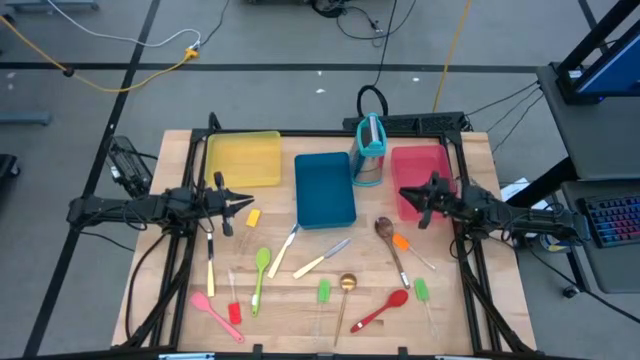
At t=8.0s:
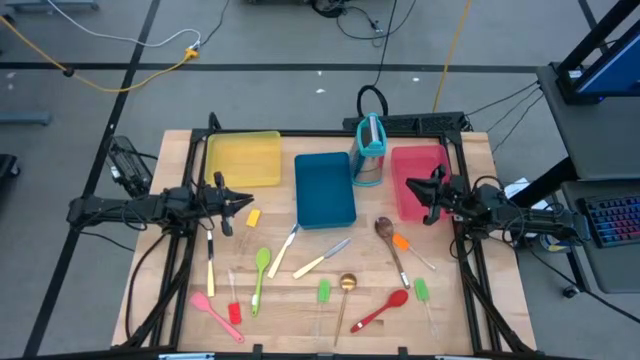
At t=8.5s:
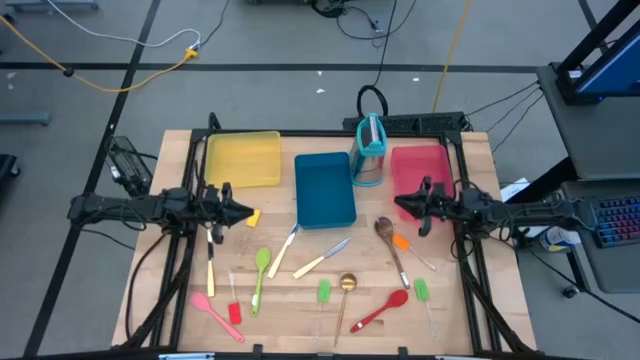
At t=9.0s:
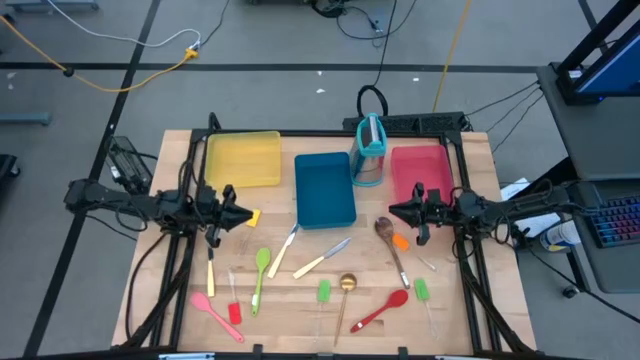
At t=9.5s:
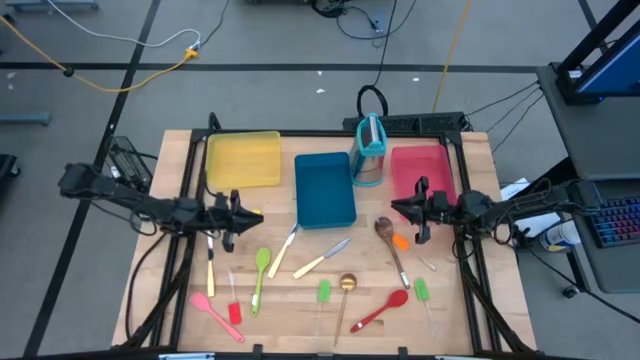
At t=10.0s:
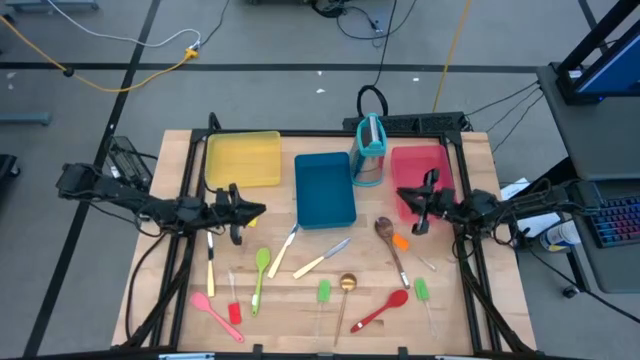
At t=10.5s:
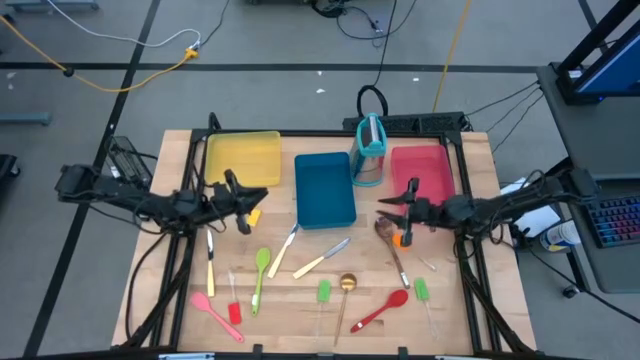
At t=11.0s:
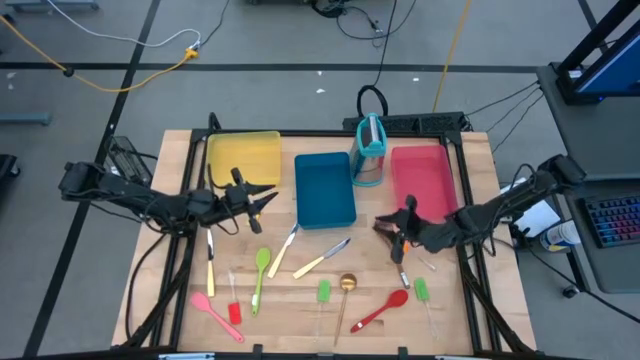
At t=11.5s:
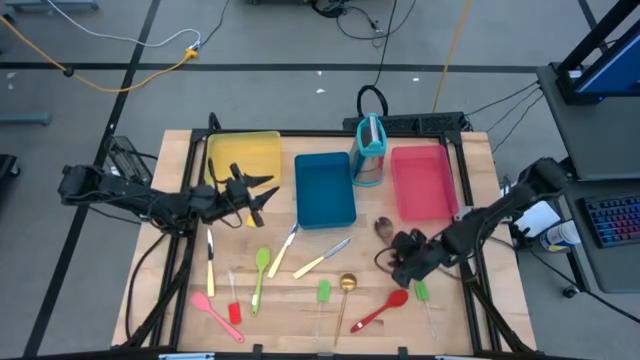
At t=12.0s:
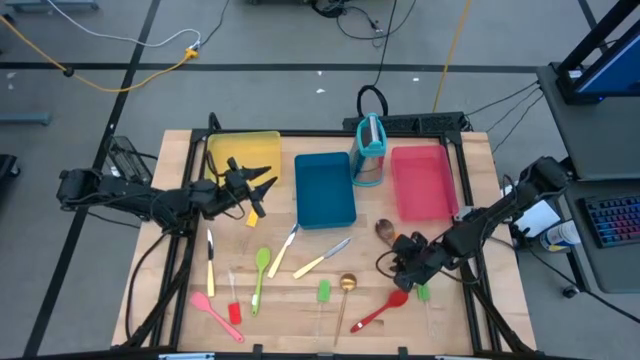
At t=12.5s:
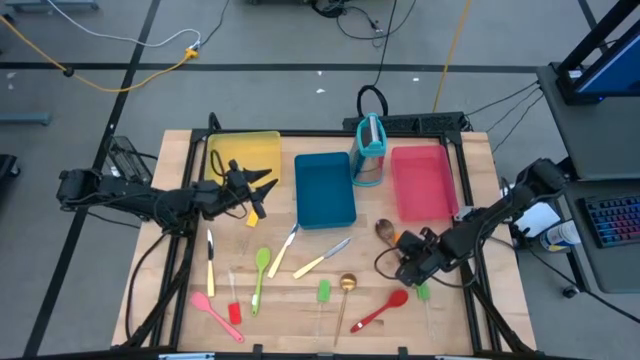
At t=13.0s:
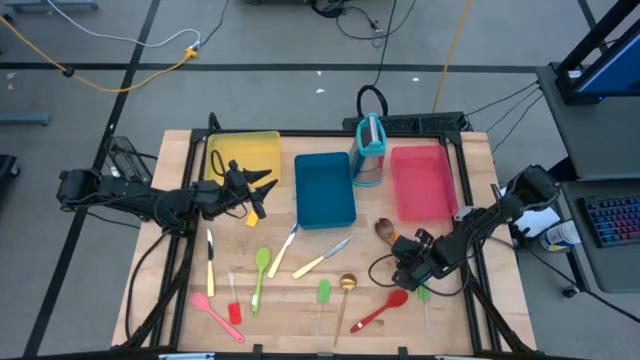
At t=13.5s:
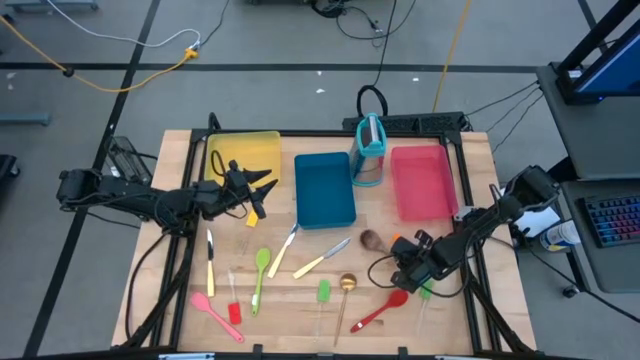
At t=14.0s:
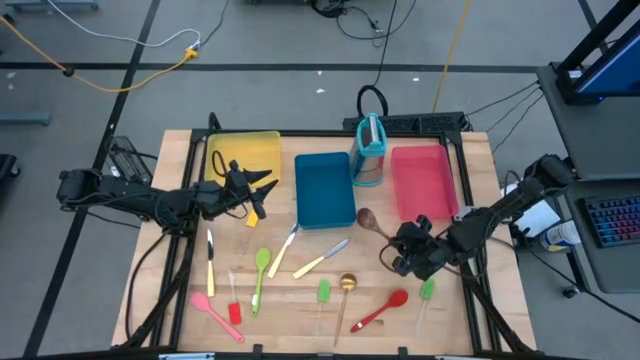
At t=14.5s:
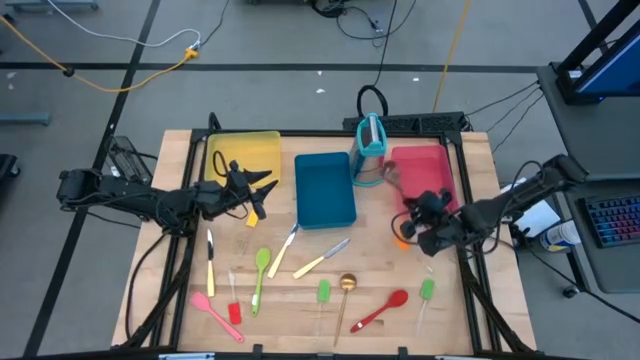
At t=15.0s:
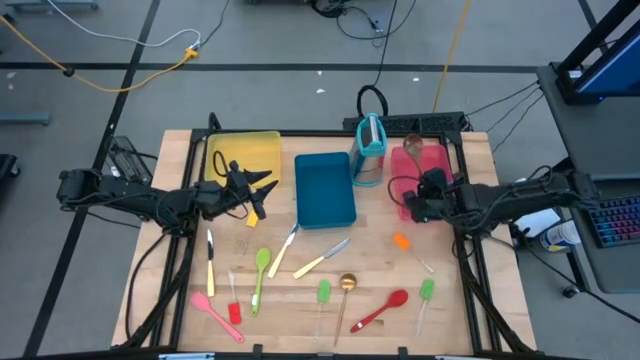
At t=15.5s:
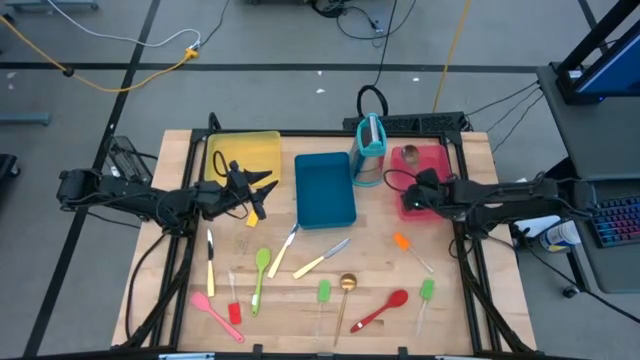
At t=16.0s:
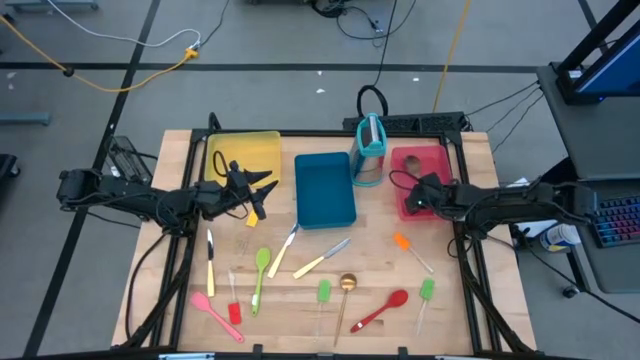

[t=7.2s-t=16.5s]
Task: Pick & Place Kitchen Items
Put the brown serving spoon into the red bin

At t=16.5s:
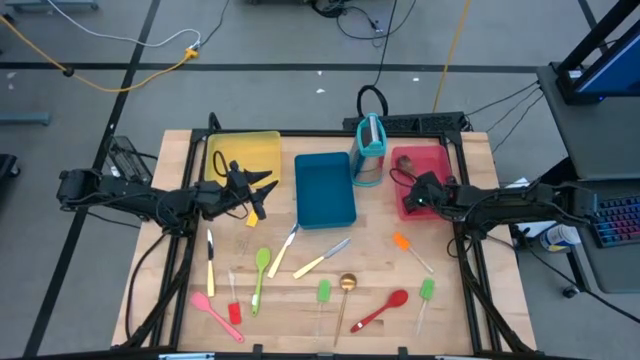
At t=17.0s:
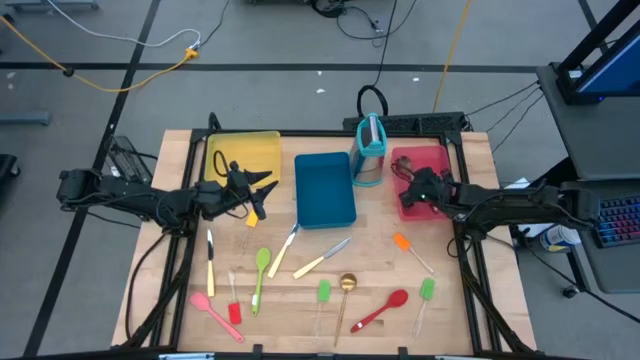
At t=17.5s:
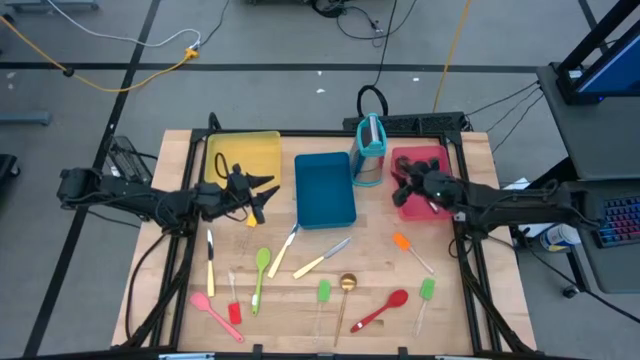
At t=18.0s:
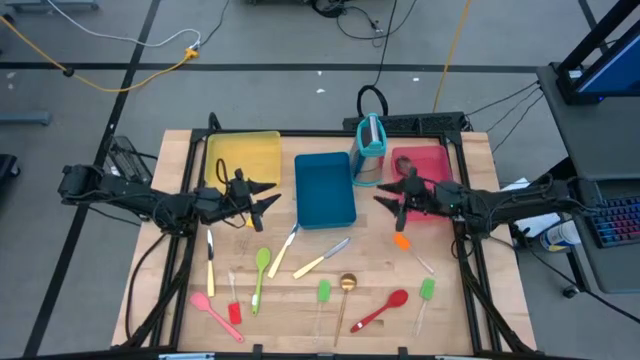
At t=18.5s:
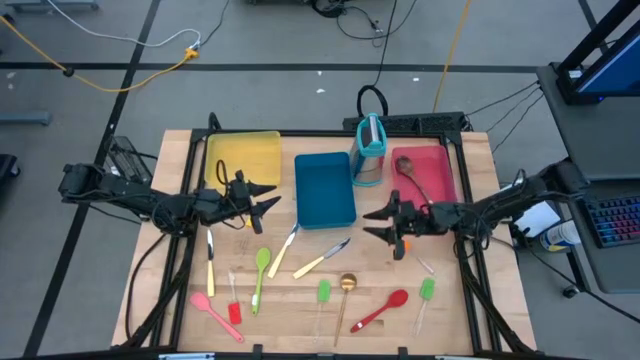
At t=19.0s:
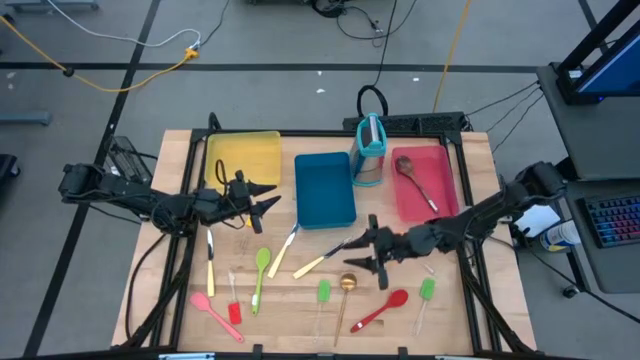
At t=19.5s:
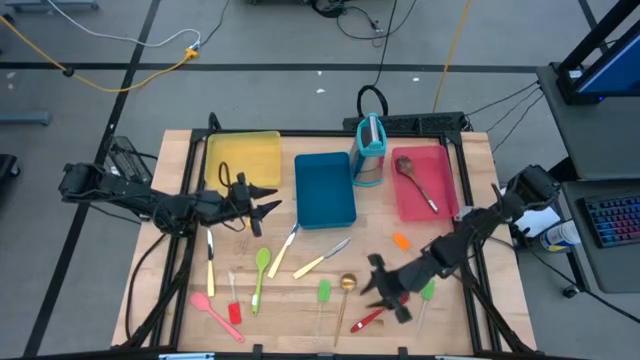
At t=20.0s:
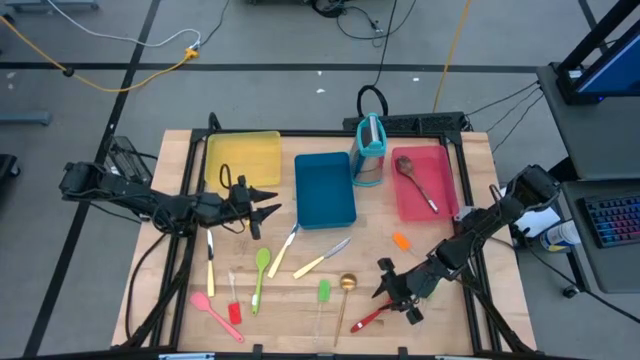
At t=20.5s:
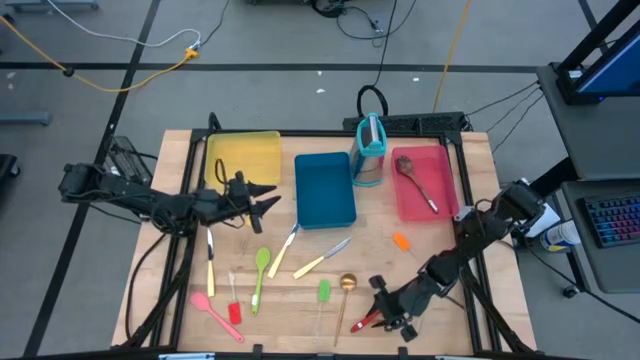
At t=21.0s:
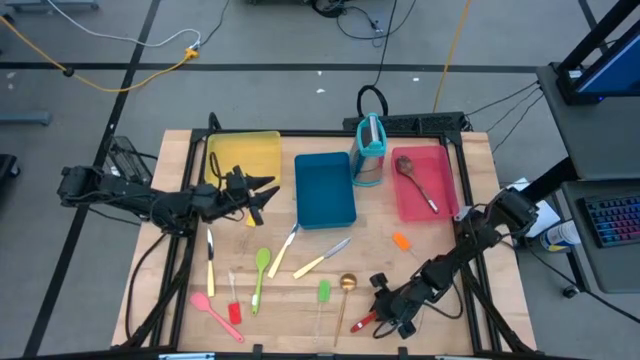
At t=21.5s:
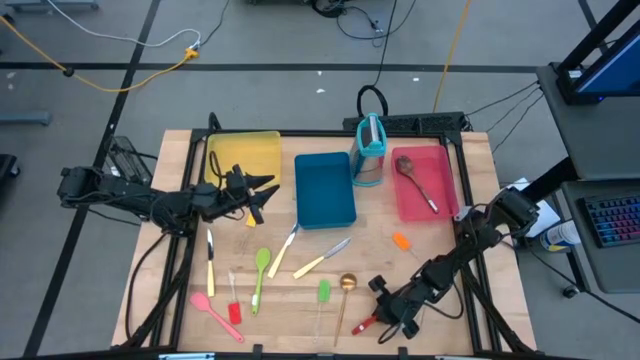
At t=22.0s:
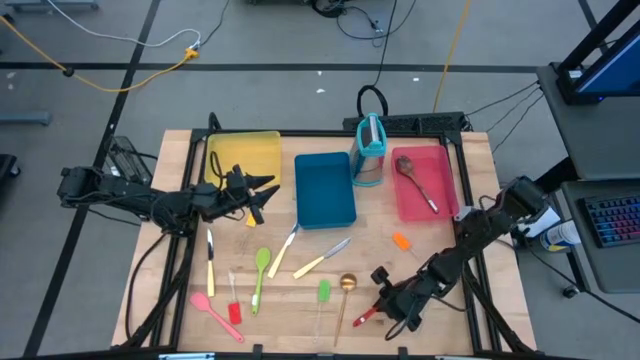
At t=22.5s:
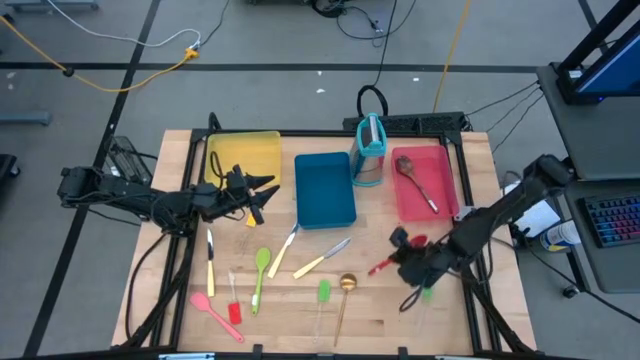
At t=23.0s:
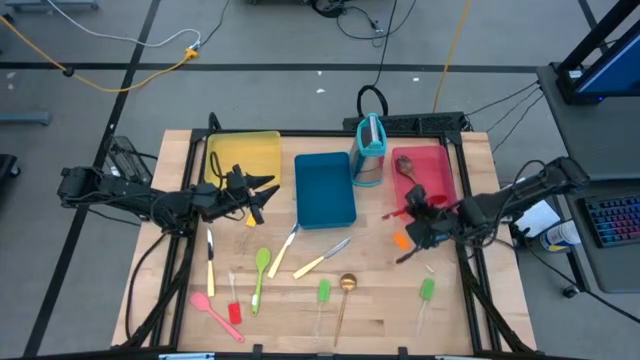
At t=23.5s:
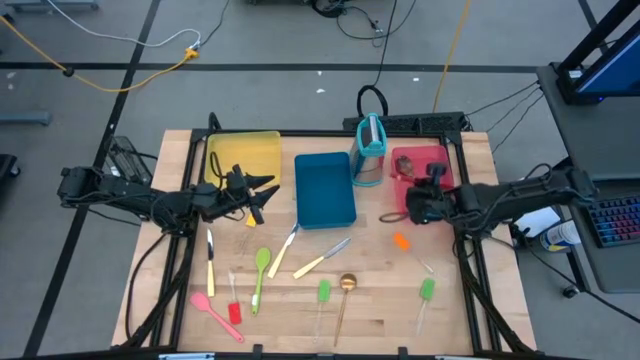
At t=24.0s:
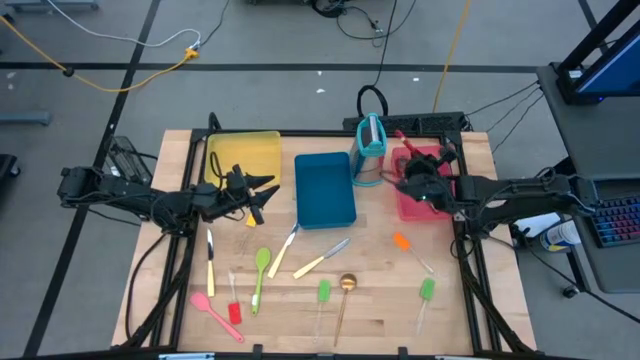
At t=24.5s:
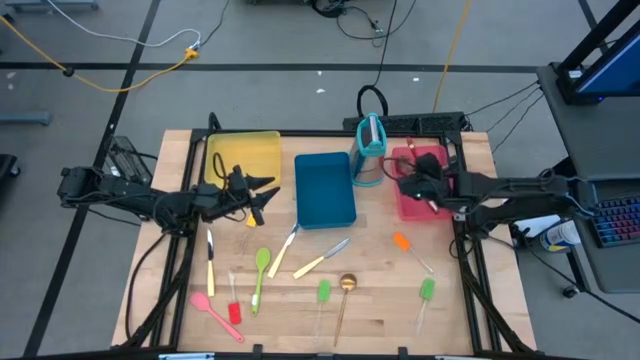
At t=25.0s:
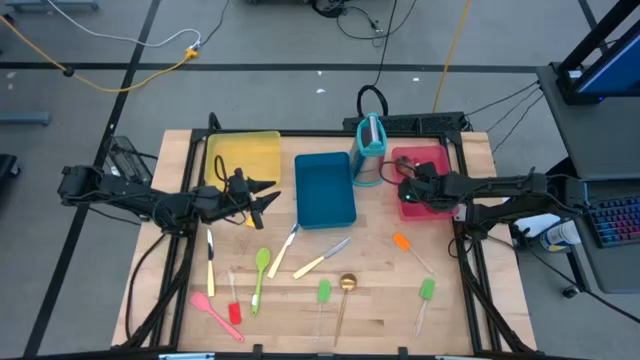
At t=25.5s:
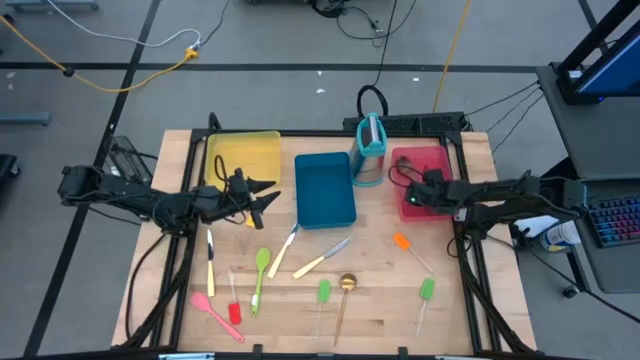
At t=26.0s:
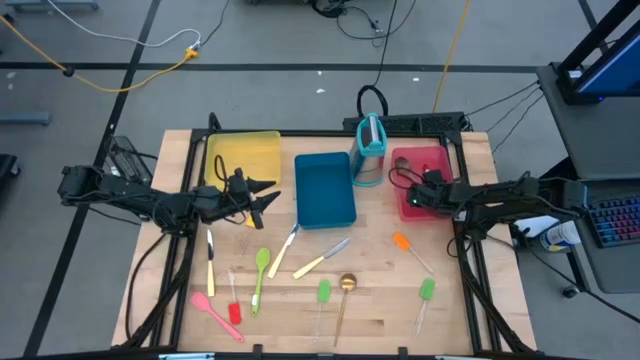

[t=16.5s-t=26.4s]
Put the red serving spoon into the red bin

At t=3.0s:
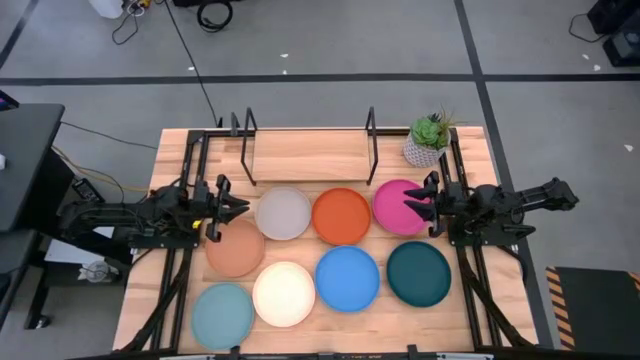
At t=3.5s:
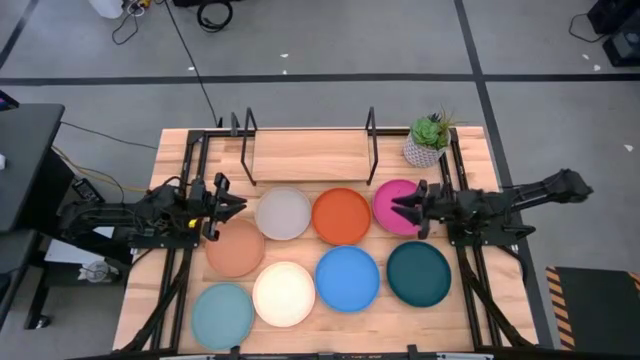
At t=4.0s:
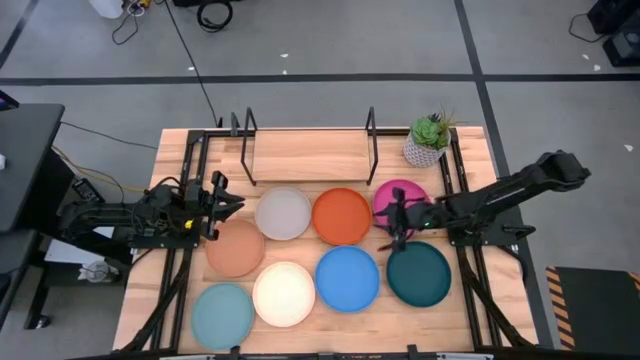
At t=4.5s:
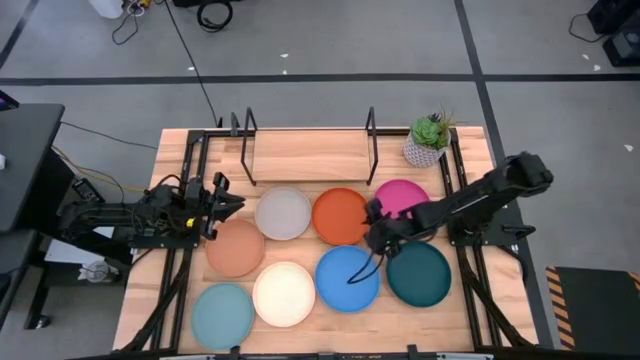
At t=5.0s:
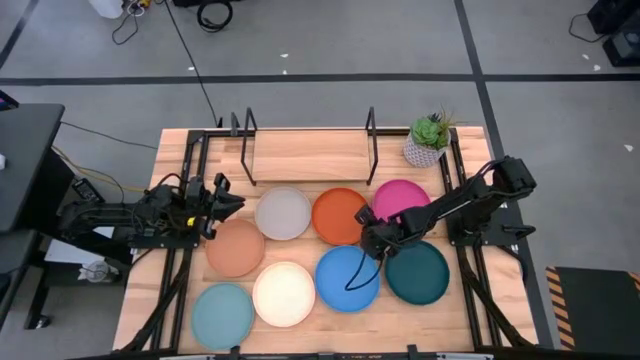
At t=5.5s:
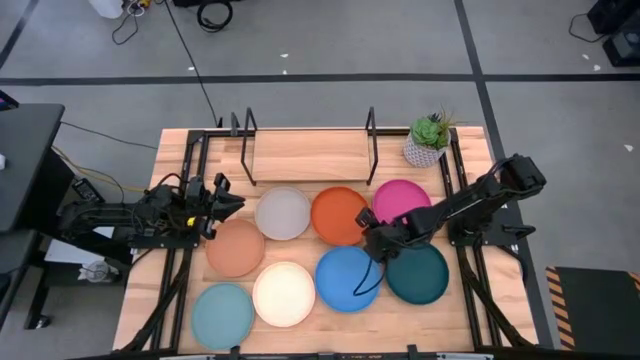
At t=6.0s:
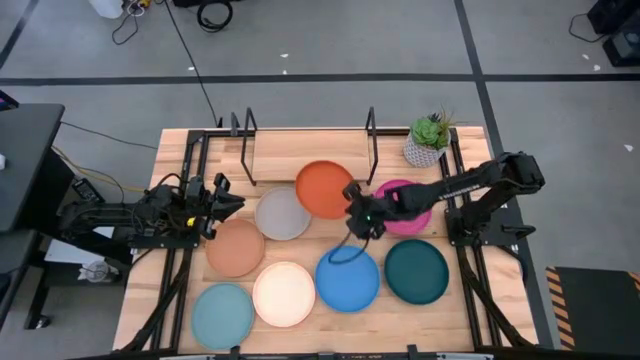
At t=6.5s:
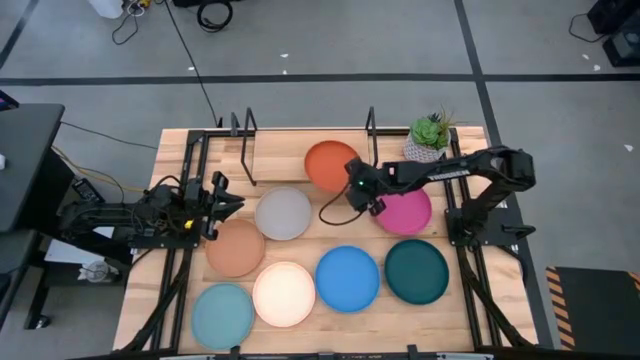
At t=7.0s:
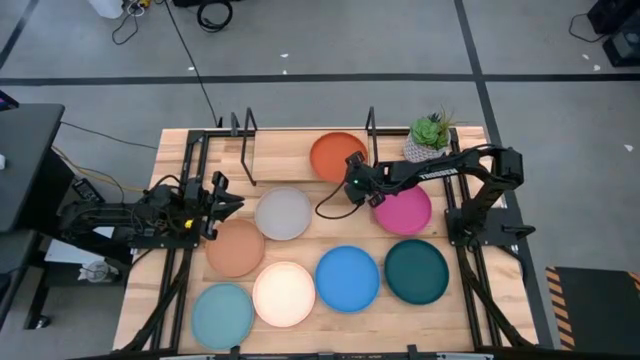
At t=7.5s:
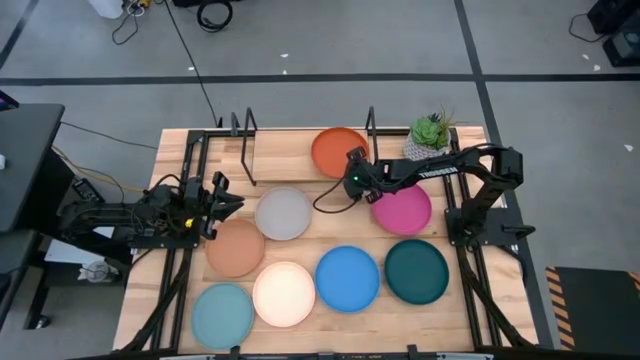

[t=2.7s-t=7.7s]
Task: Place and stack plates onto a shelf
Put the orange plate on the shelf
